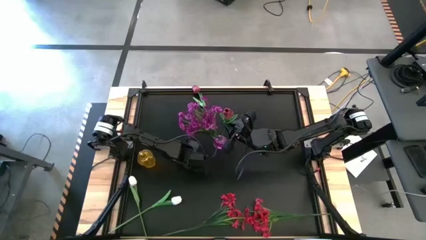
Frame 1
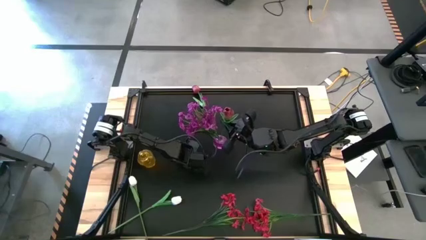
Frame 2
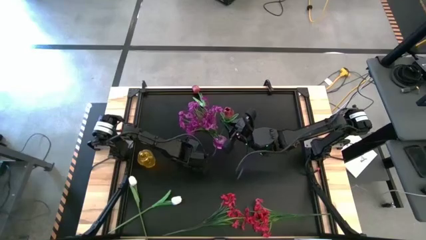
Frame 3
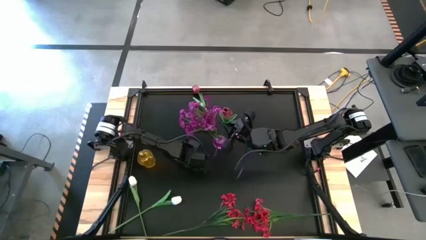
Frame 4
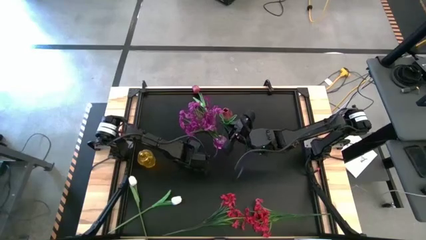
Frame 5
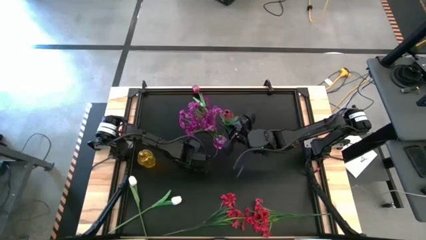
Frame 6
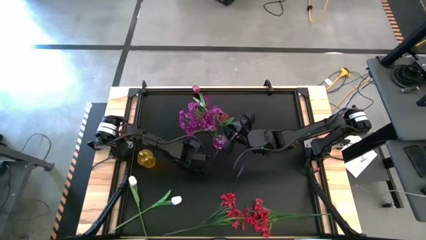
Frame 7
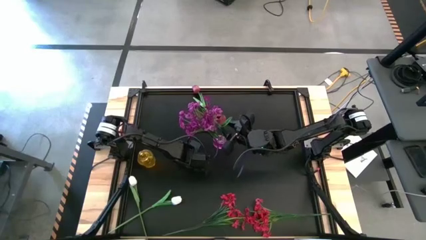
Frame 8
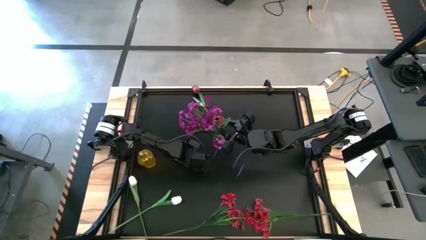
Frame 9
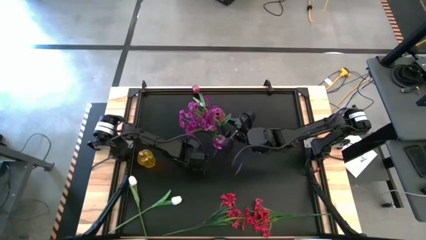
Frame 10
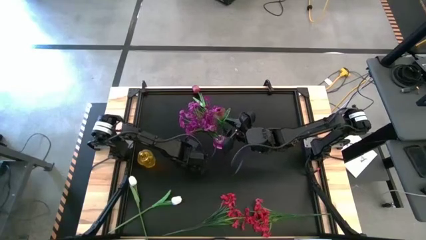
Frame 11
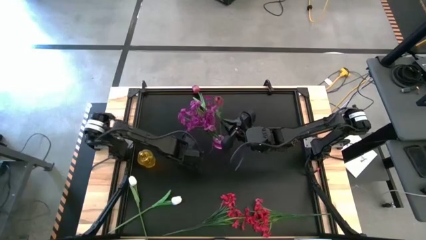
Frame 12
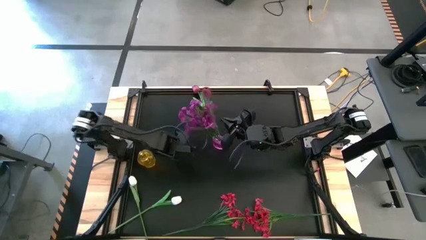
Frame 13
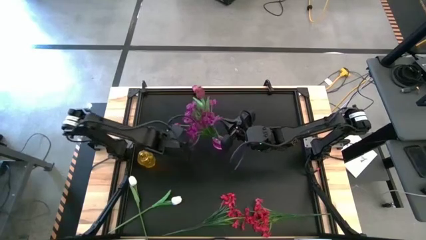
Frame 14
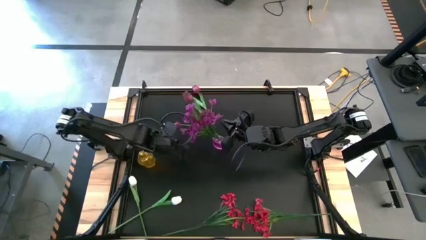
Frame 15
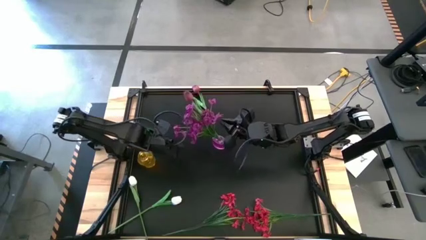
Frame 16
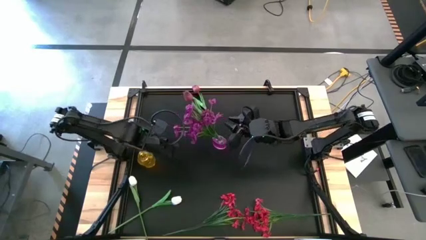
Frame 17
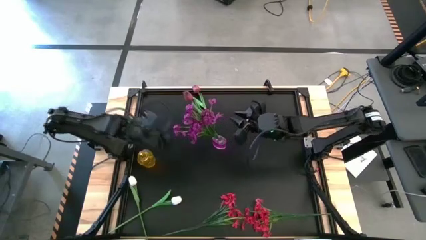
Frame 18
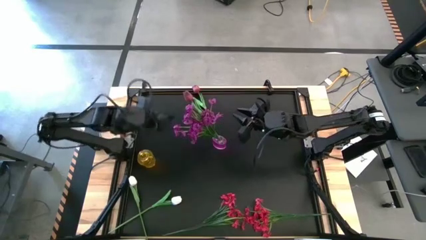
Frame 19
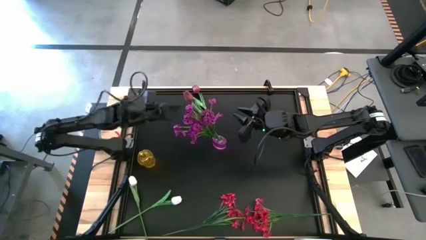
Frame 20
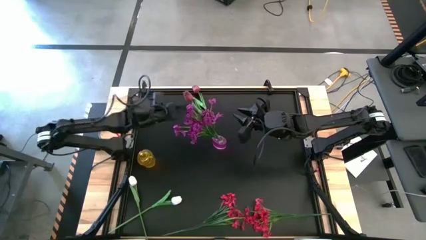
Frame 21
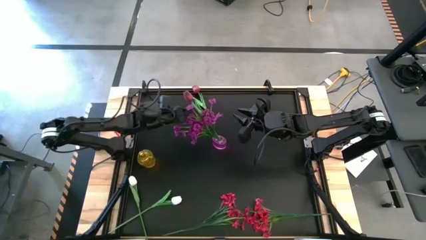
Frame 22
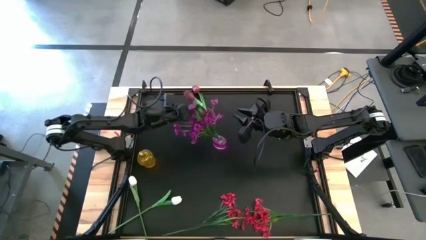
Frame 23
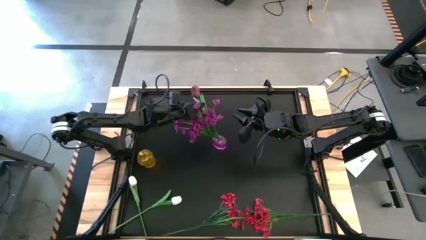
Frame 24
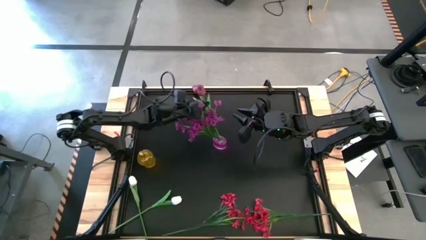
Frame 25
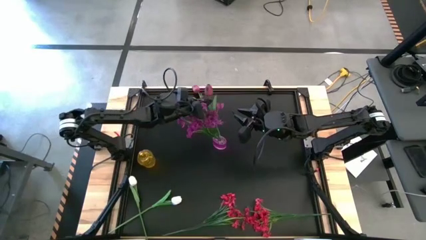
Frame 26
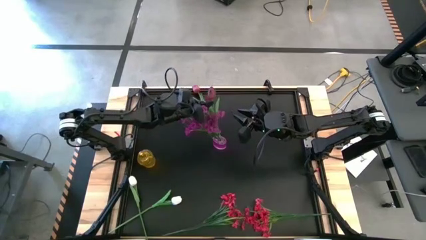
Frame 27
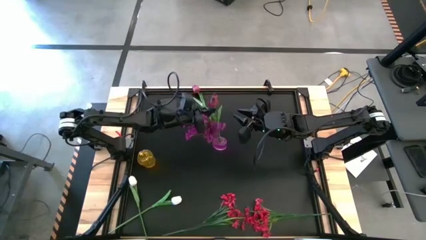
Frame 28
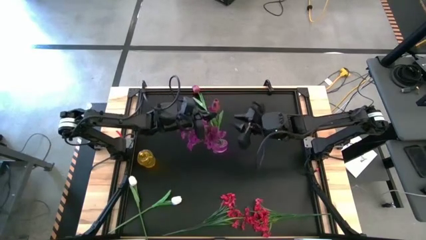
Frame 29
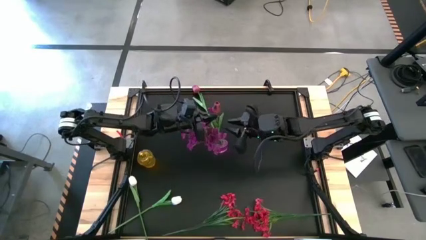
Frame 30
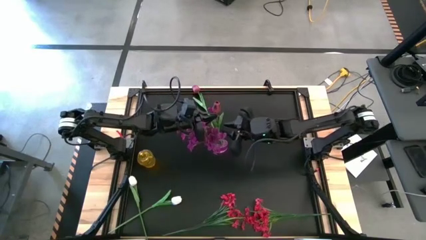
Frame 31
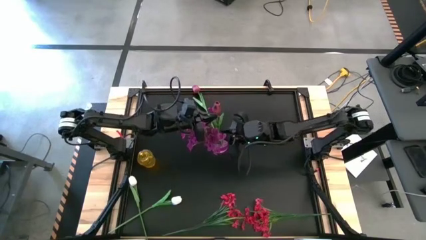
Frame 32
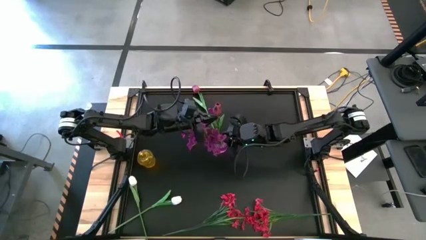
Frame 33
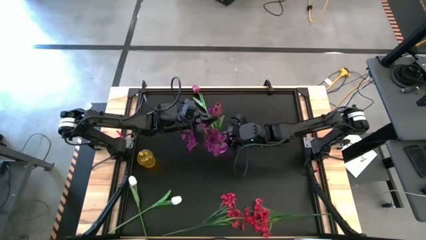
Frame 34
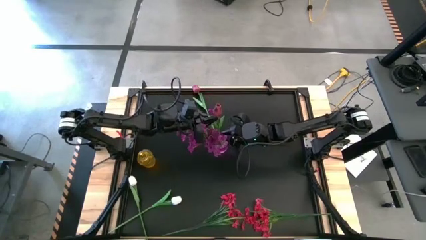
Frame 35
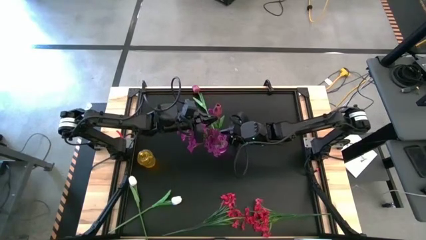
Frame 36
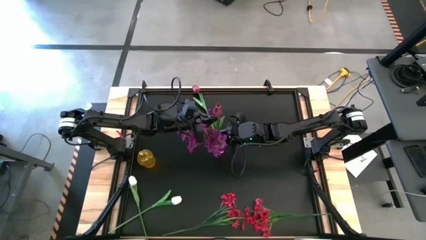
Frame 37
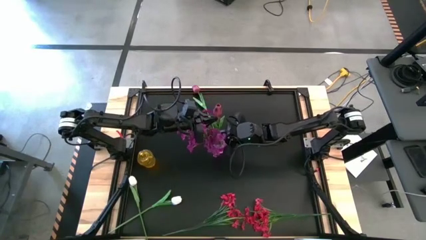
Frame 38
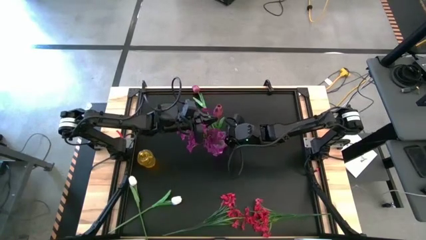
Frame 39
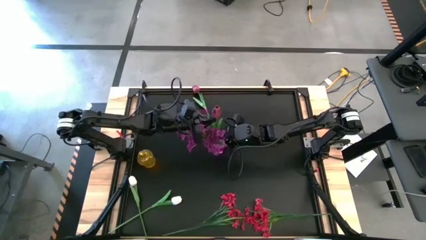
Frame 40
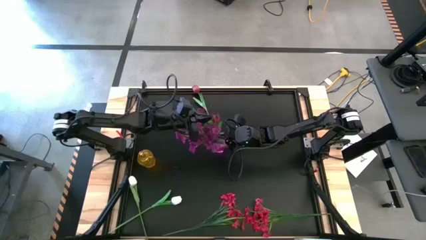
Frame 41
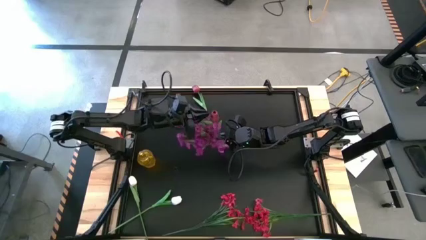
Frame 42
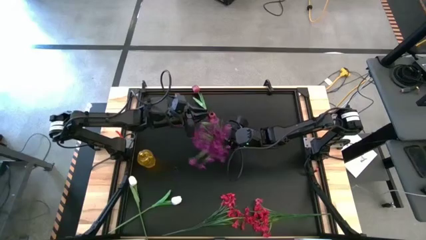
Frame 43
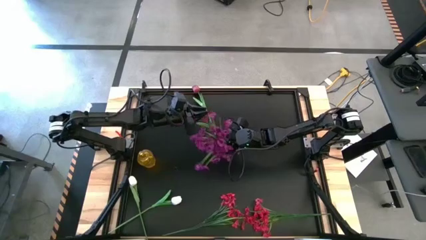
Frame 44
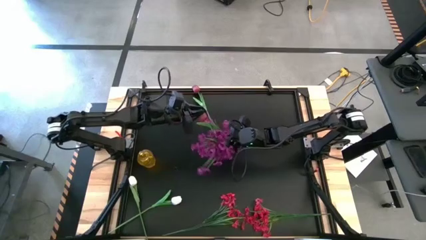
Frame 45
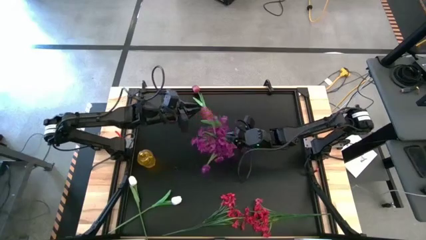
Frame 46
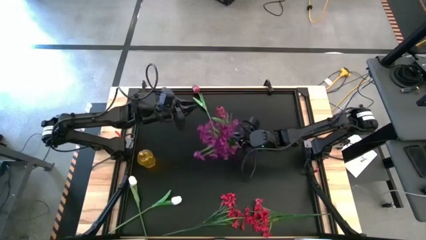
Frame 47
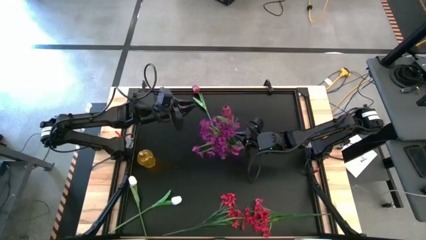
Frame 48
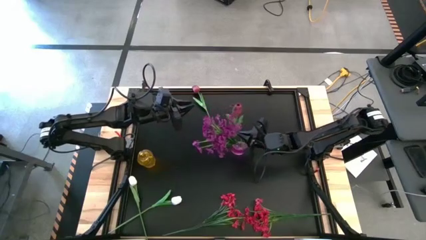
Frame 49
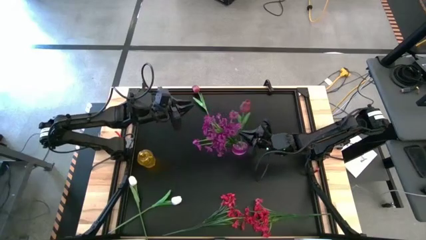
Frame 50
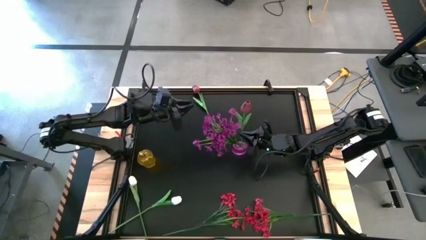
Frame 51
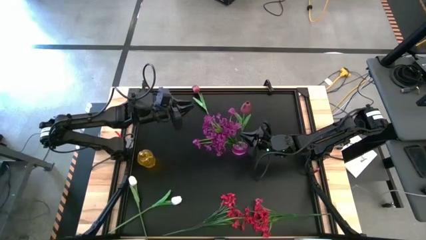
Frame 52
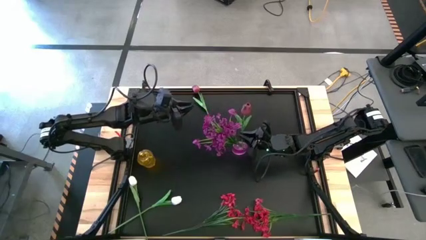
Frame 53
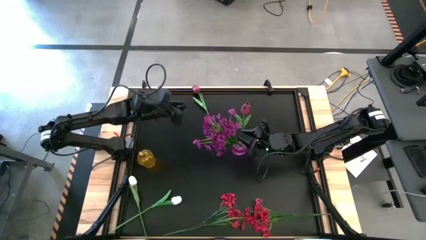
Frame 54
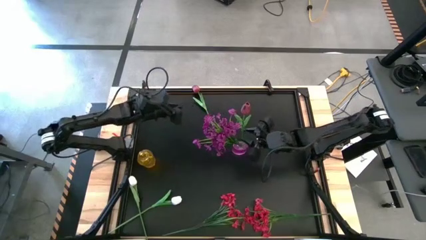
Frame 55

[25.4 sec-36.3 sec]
Task: Sort flowers into vase by color
Put the left red tulip into the violet flower vase

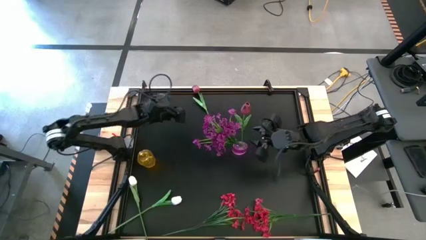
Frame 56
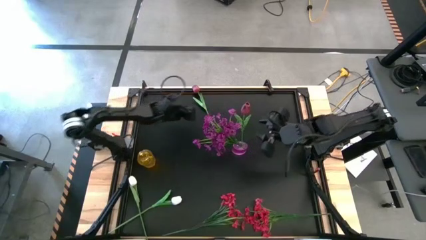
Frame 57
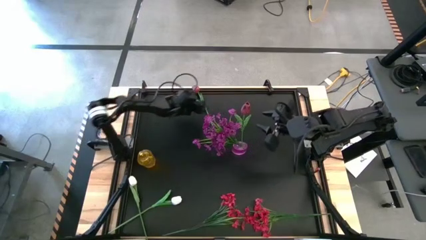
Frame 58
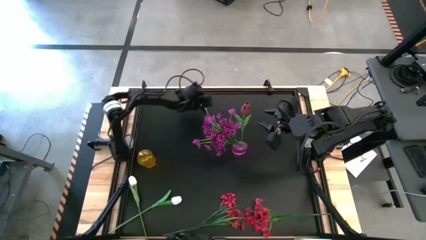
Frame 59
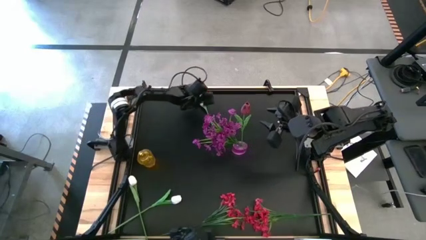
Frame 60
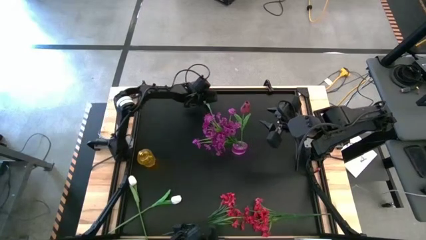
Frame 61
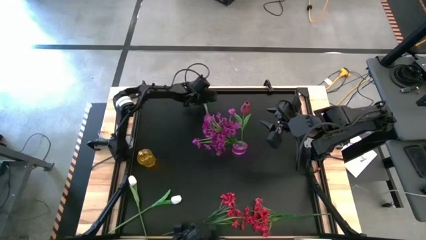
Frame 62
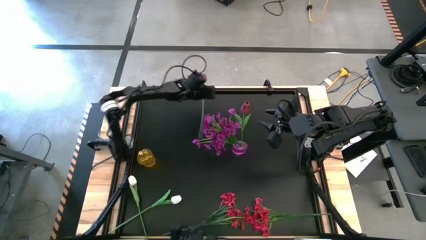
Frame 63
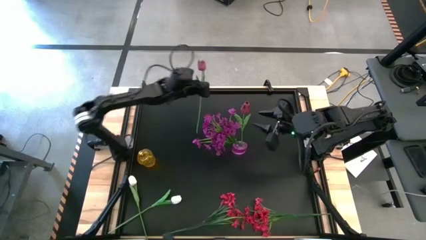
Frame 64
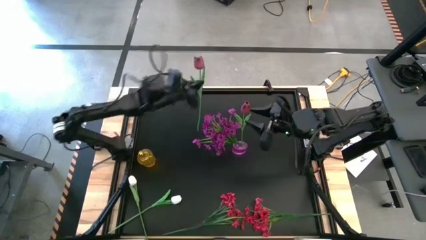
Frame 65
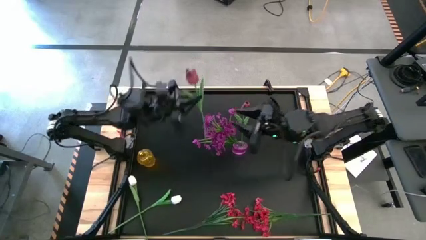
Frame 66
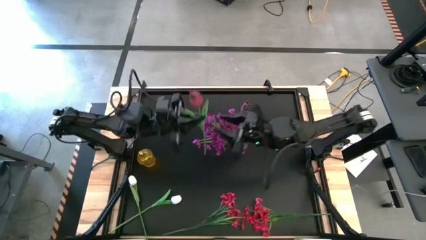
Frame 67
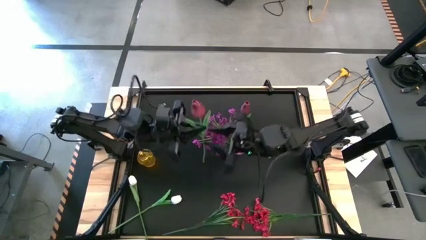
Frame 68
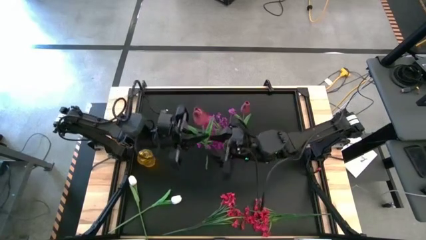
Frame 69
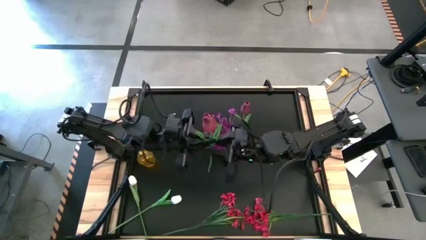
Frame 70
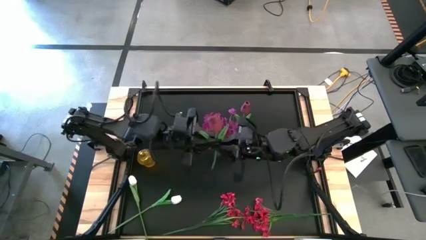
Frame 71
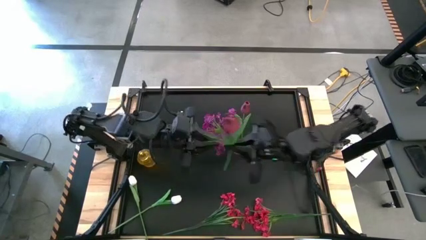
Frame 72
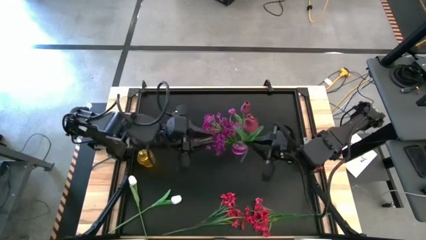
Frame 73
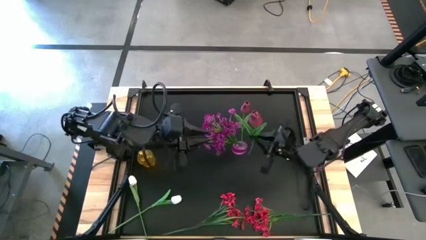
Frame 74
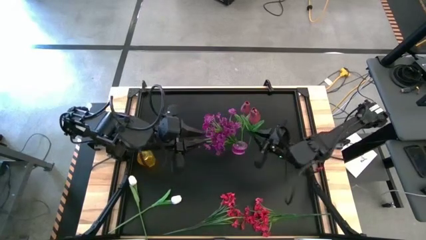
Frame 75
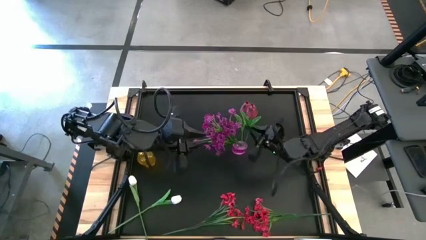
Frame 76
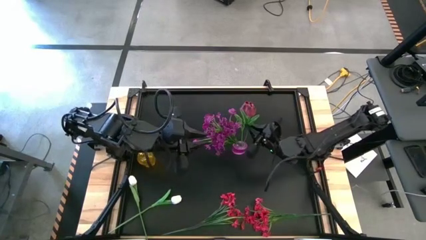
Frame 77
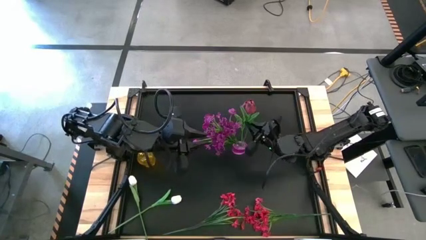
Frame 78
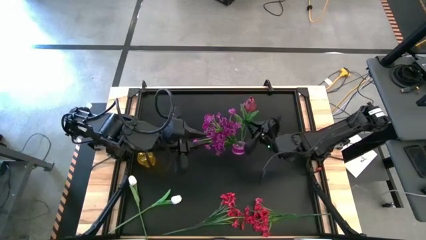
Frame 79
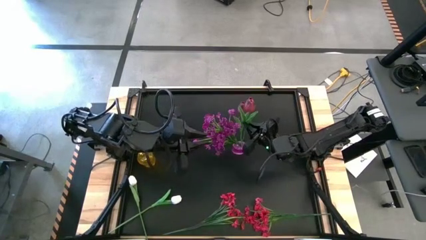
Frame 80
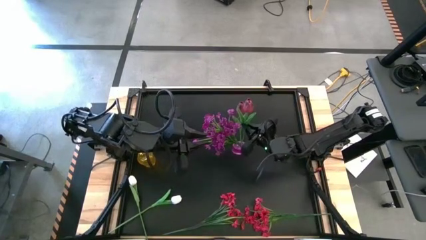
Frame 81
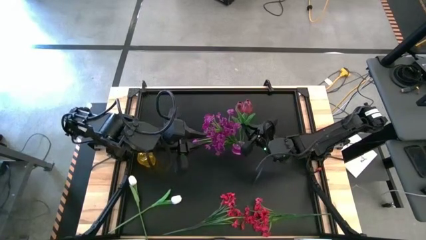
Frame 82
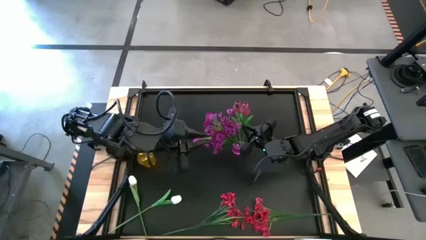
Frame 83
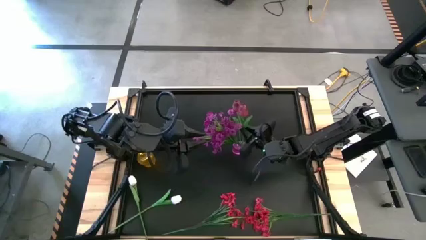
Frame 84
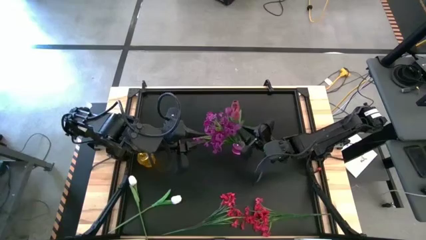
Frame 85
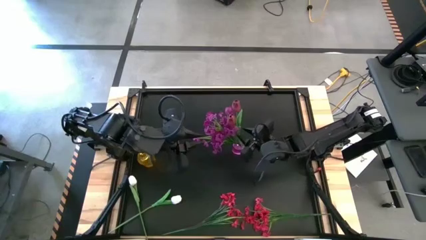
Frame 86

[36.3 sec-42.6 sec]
Put the red tulip into the violet flower vase
